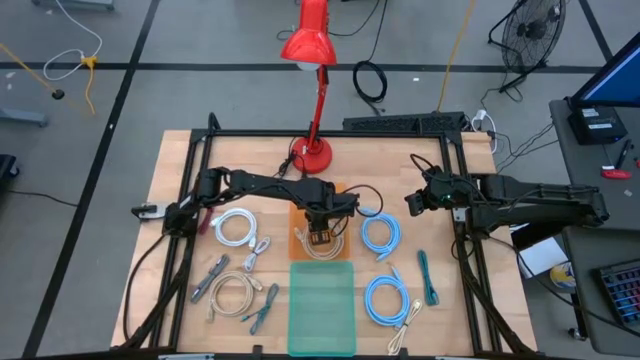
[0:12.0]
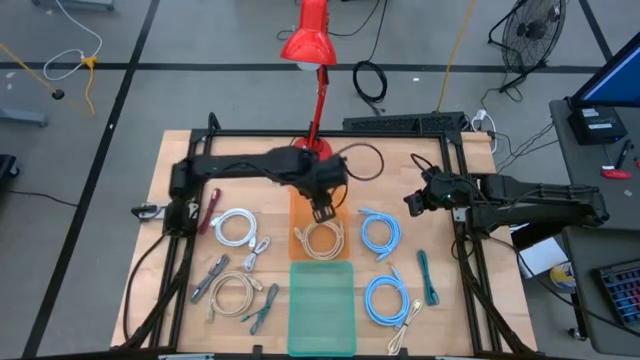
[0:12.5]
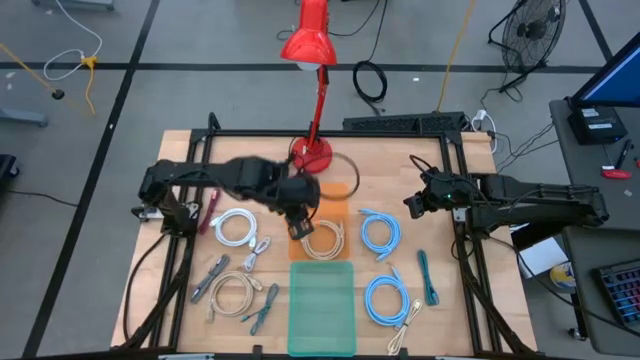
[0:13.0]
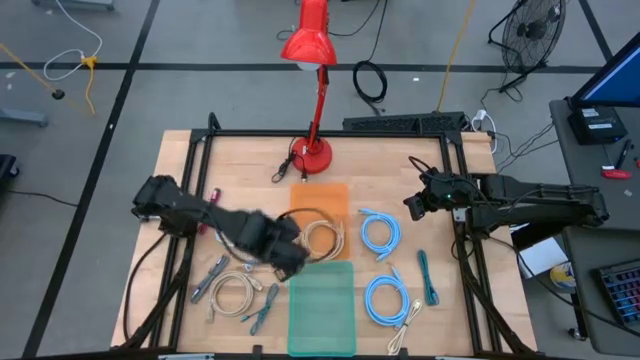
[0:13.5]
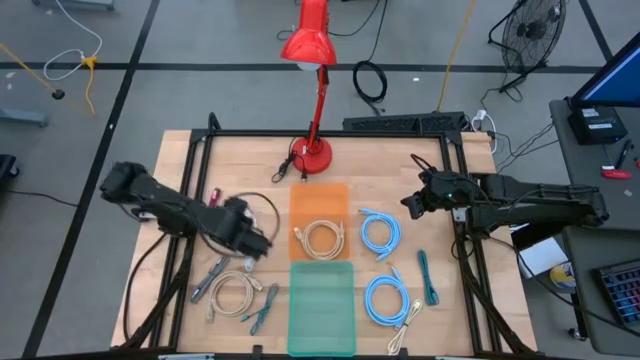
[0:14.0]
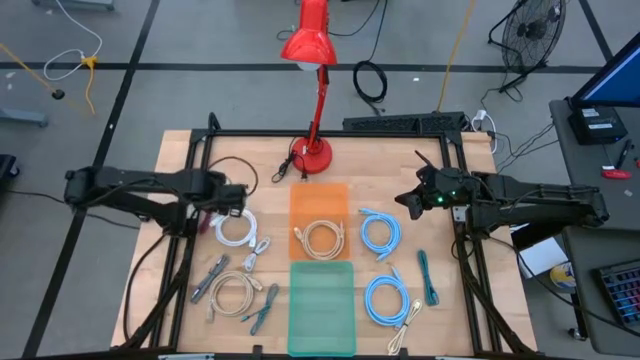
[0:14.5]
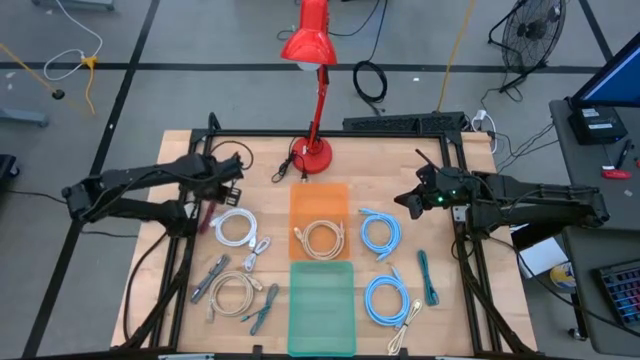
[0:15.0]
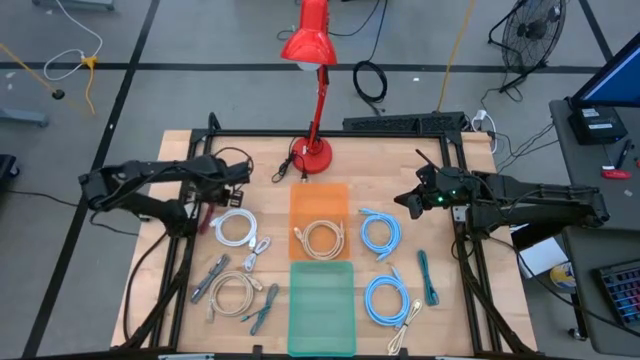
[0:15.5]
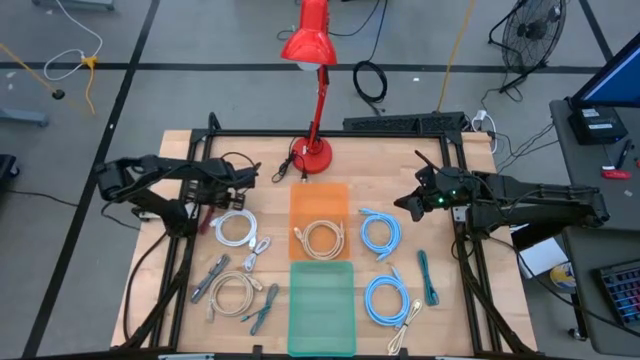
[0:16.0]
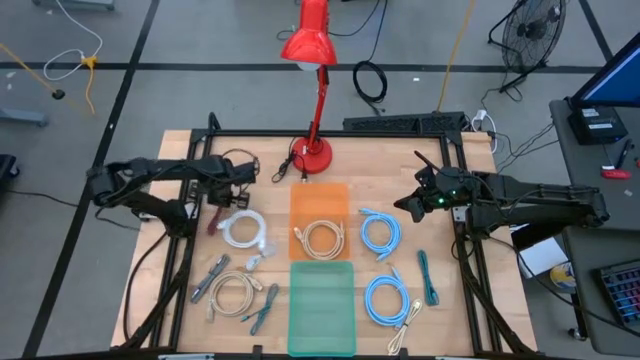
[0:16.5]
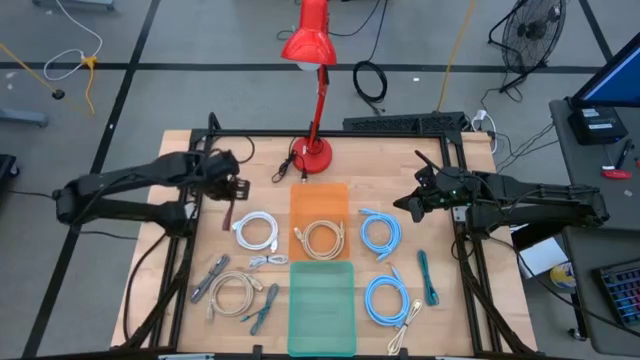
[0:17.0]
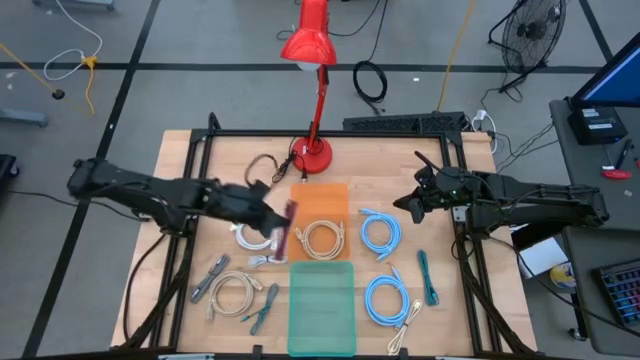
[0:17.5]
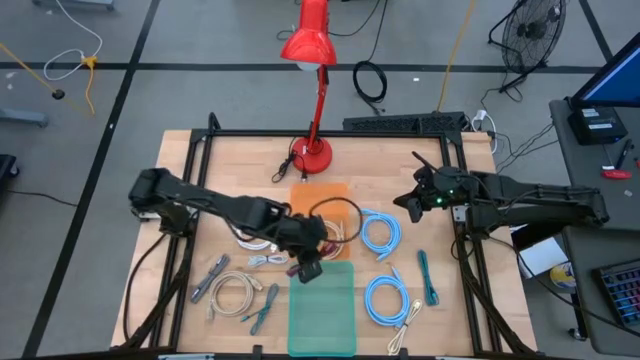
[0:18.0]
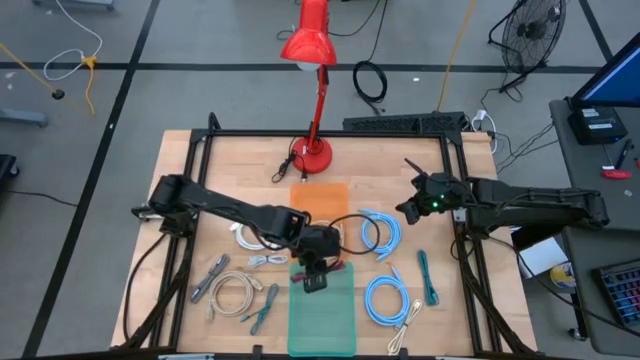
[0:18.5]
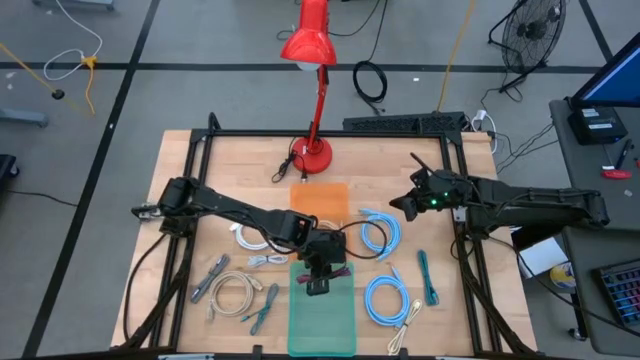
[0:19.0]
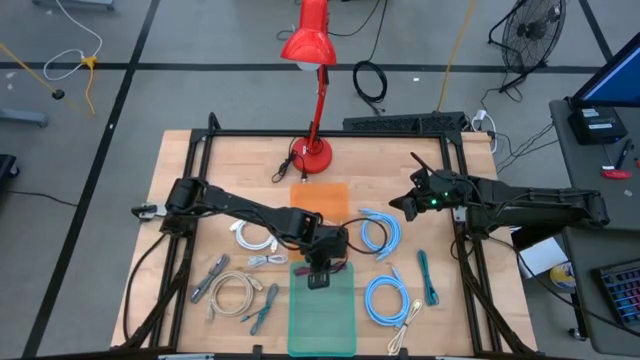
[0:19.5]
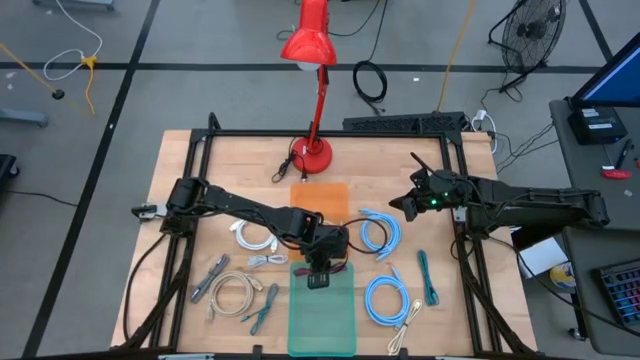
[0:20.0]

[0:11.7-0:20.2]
Task: Sort cables
Put the pink charger cable into the blue bin

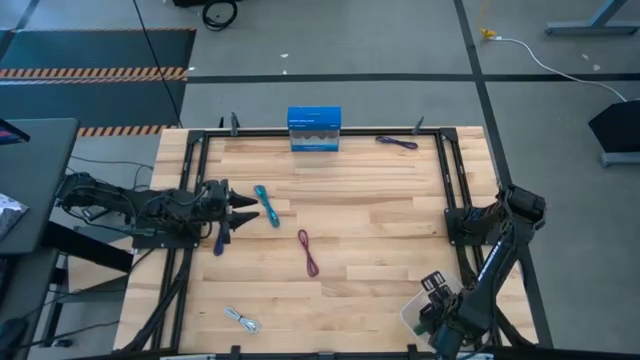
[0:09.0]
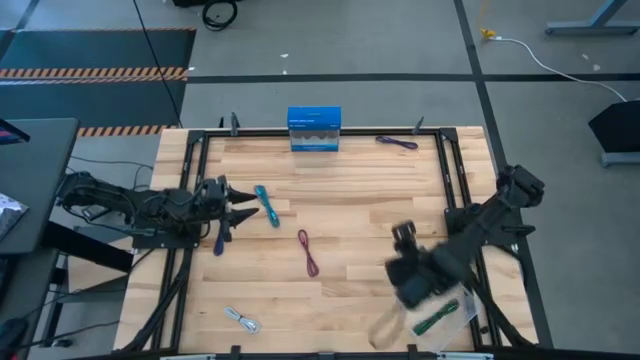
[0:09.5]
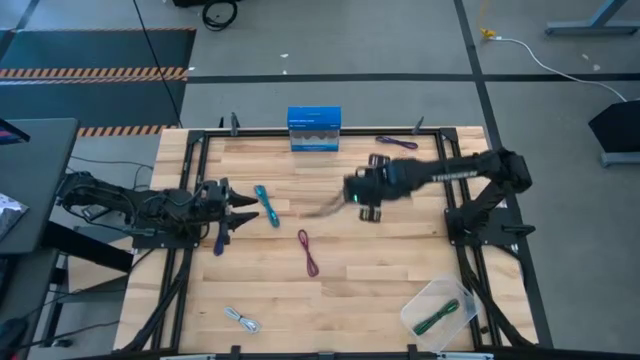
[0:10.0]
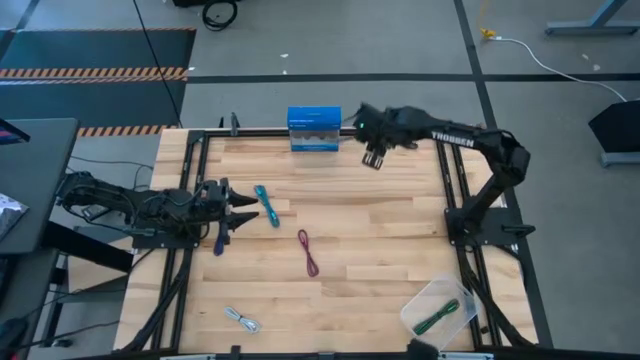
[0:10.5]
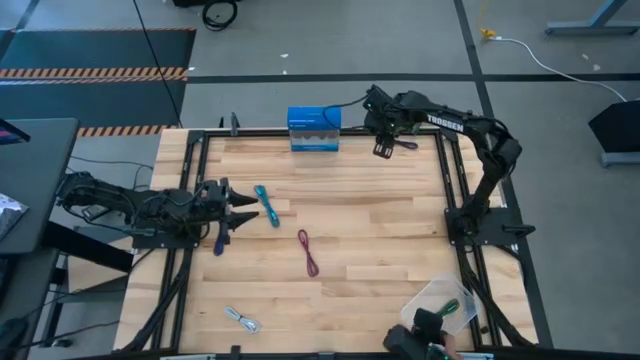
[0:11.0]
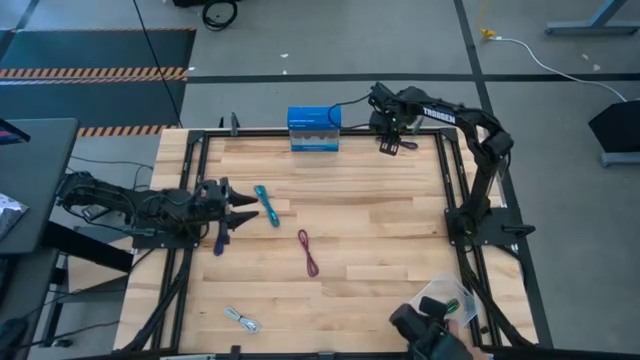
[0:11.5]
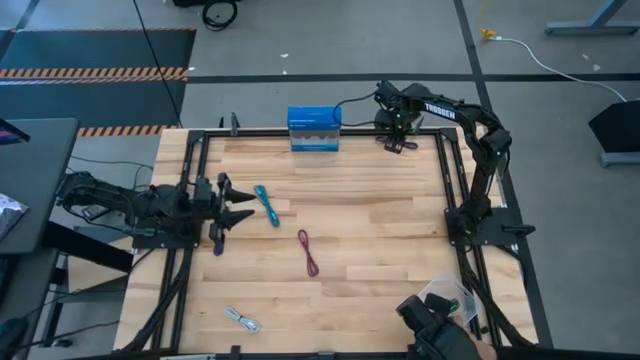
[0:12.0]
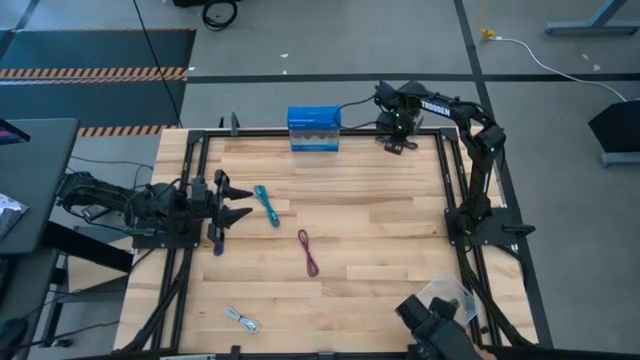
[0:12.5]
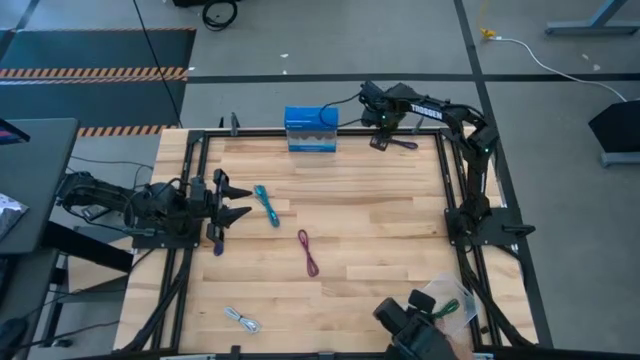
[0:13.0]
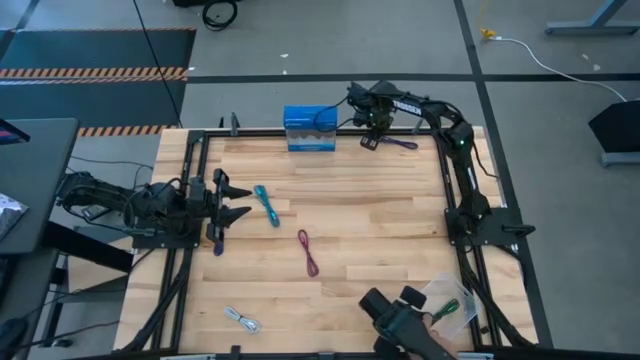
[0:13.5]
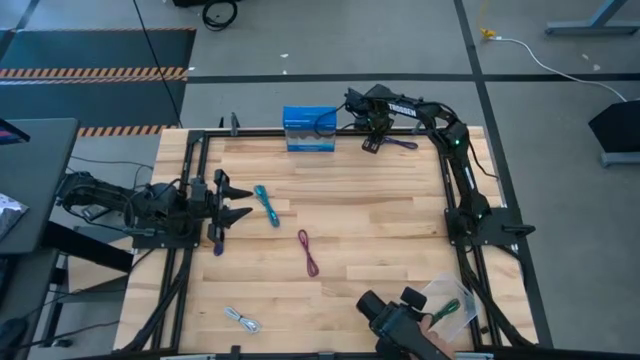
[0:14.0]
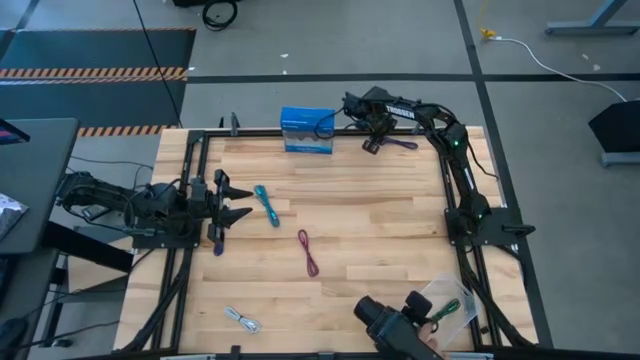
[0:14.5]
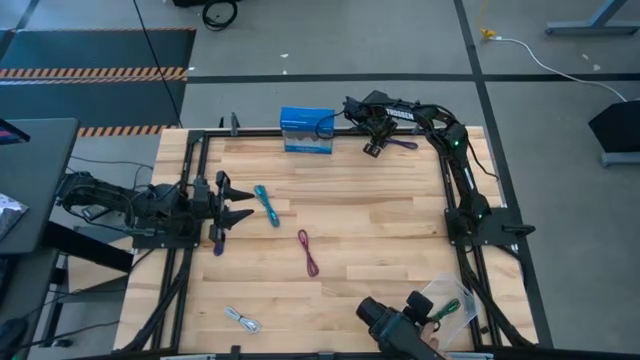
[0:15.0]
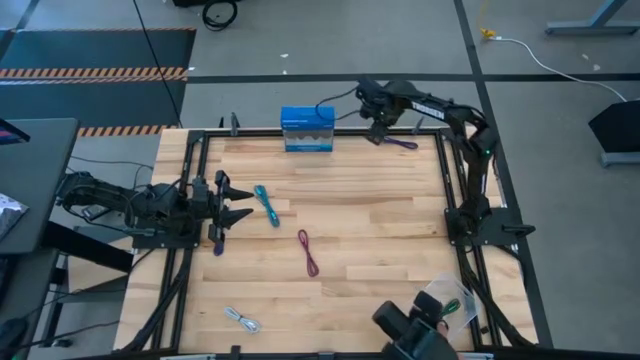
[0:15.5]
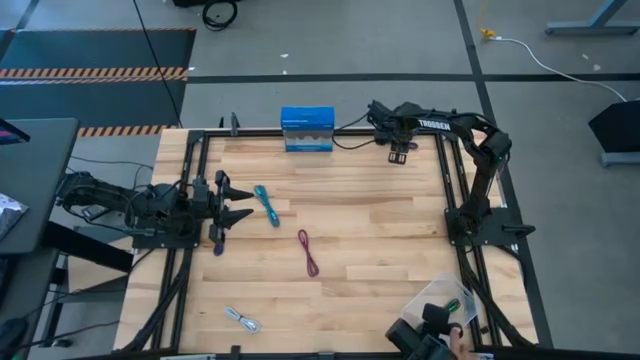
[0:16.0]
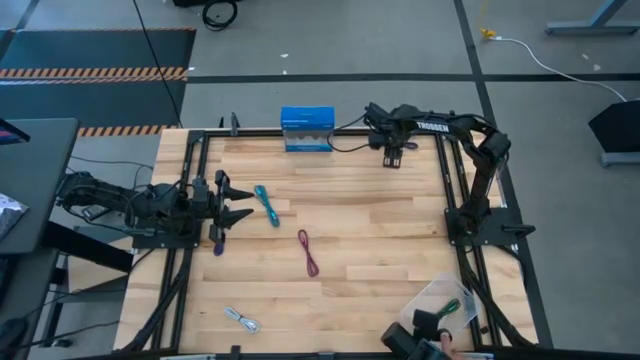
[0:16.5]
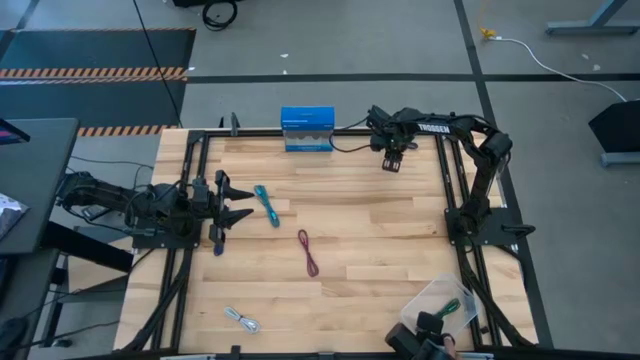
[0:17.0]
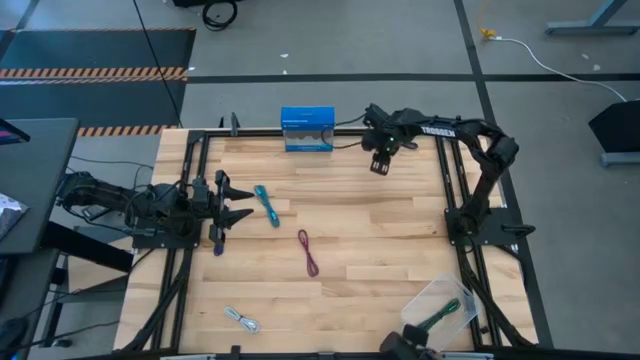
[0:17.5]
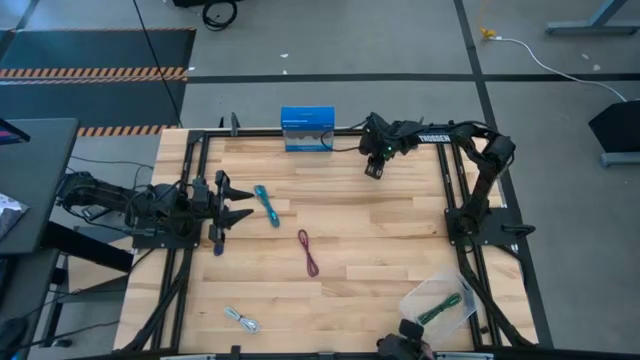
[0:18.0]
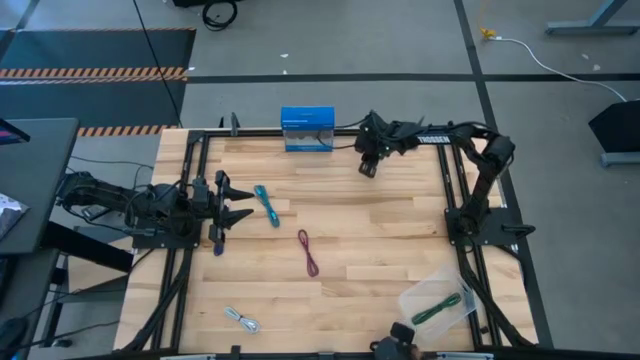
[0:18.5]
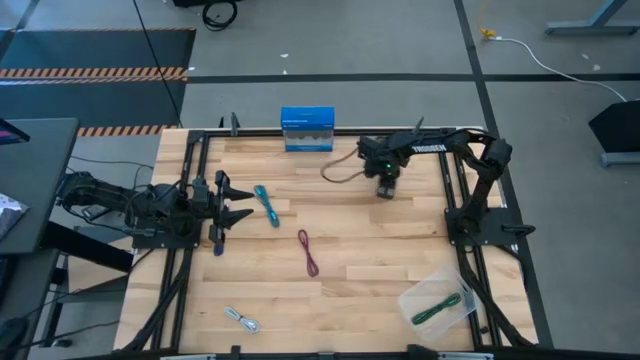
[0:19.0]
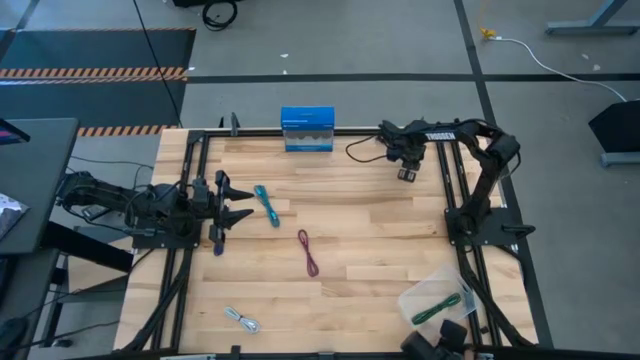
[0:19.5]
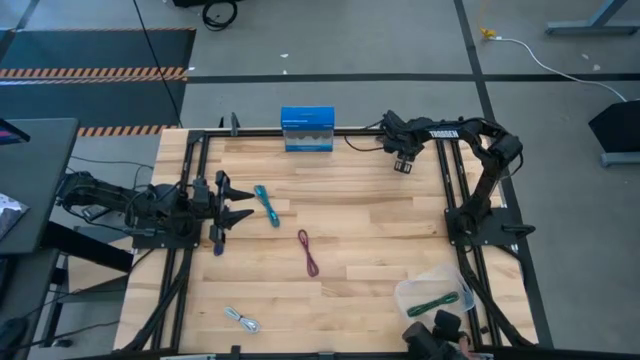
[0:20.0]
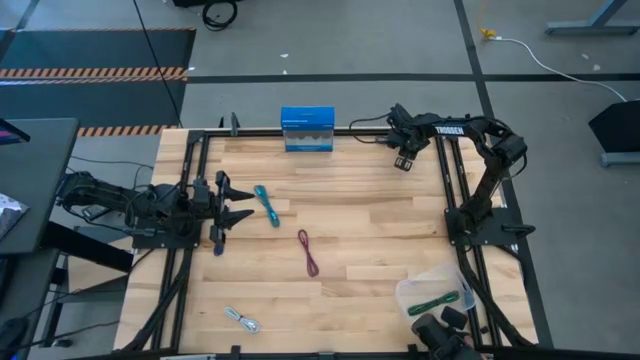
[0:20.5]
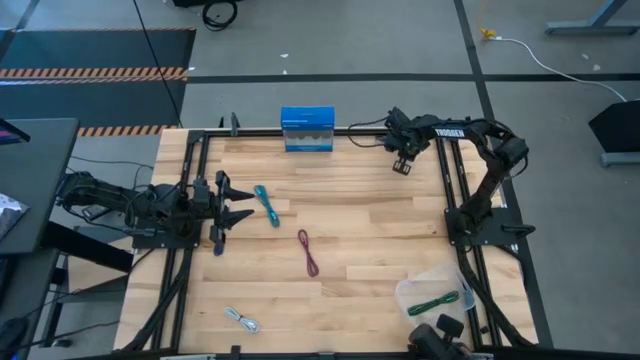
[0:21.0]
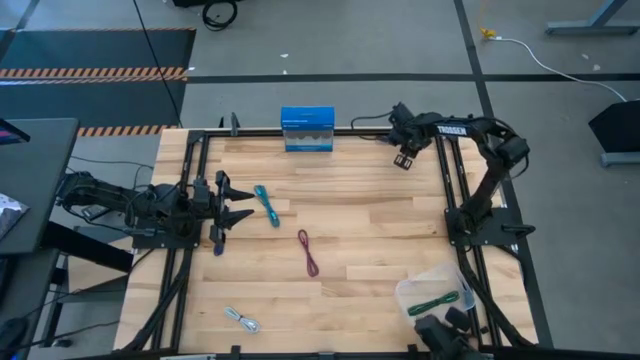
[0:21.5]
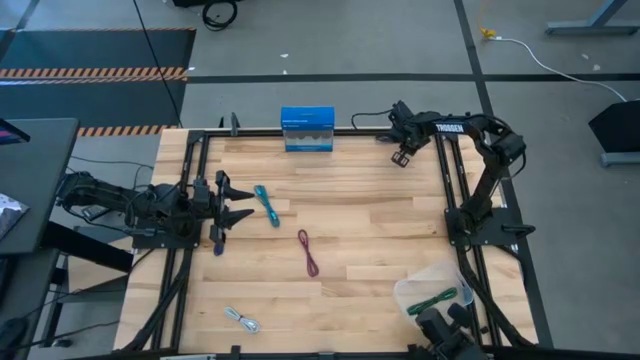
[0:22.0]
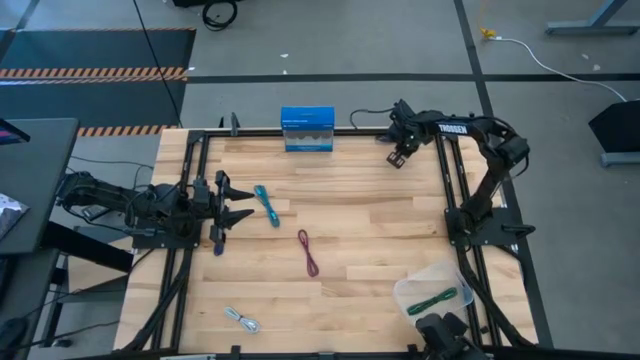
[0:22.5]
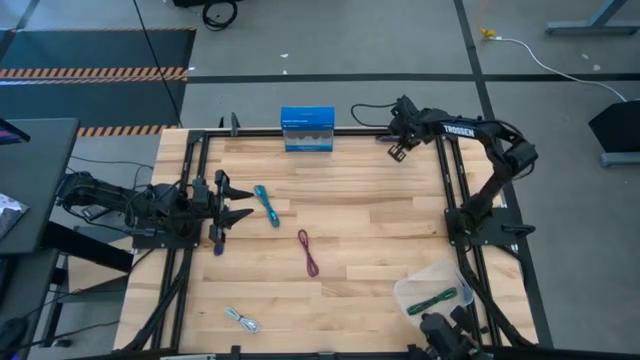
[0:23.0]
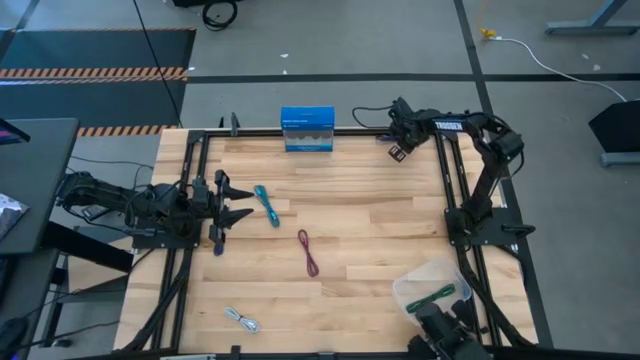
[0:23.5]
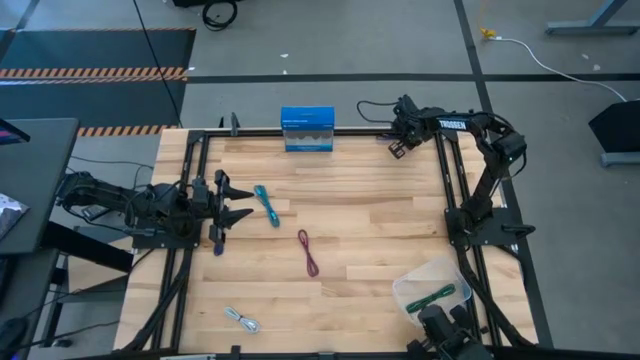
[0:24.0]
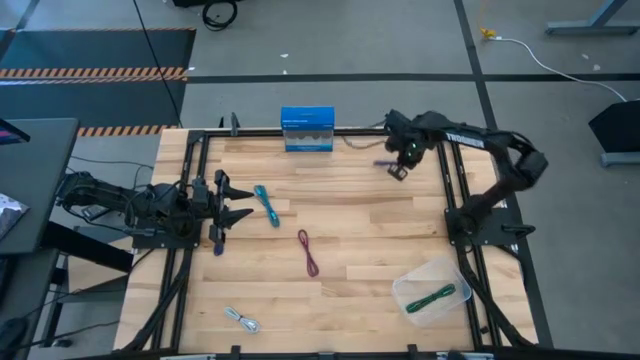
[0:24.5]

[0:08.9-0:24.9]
Task: Pick and place USB-C Cables
Put the right dark blue charger cable into the transparent bin
